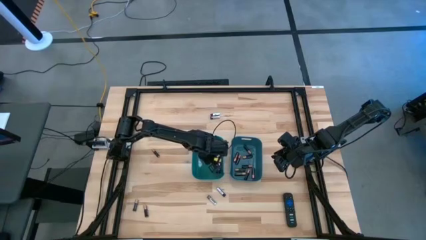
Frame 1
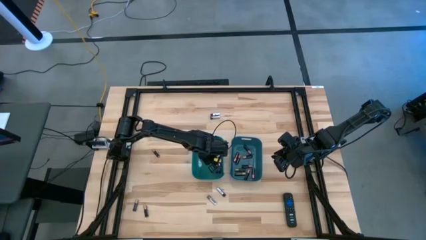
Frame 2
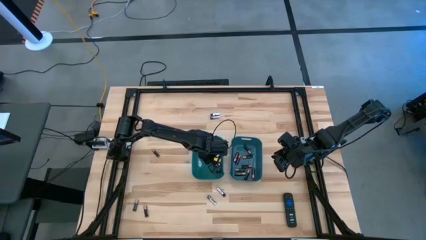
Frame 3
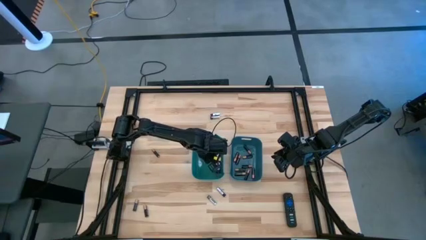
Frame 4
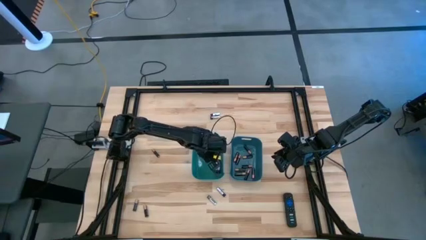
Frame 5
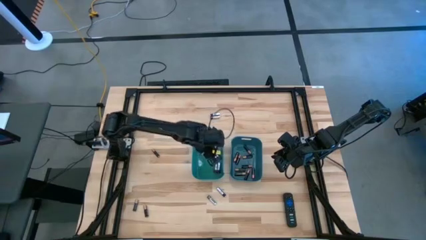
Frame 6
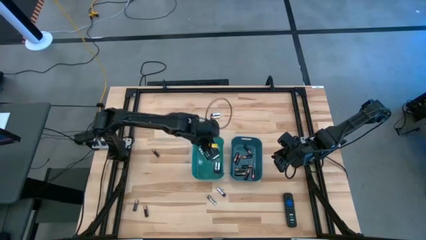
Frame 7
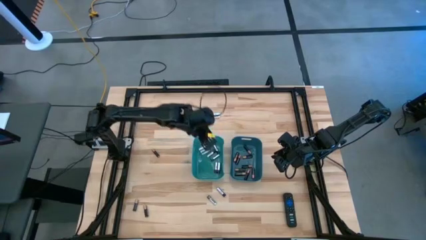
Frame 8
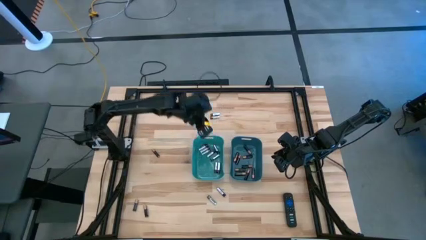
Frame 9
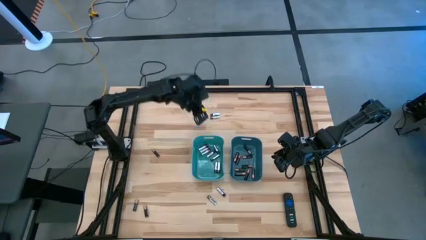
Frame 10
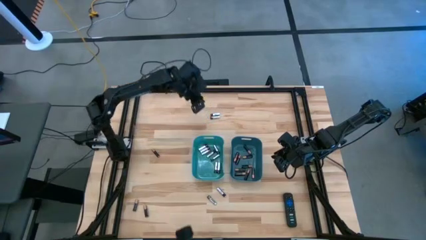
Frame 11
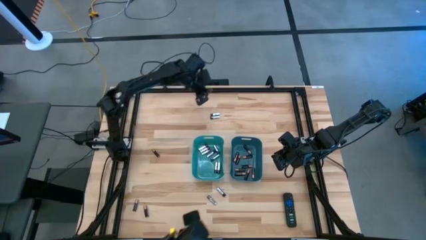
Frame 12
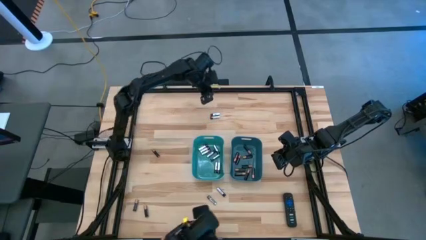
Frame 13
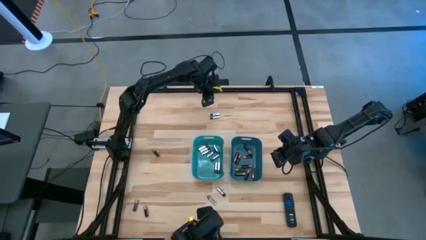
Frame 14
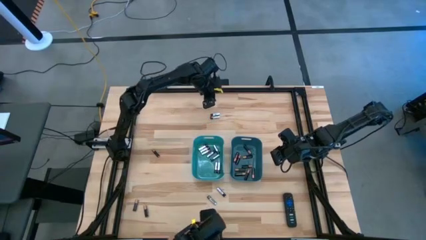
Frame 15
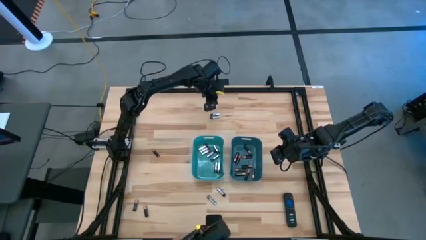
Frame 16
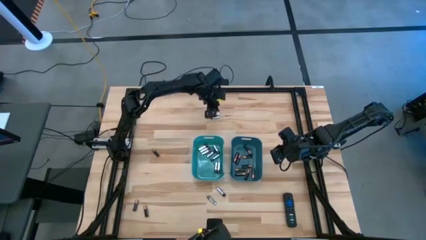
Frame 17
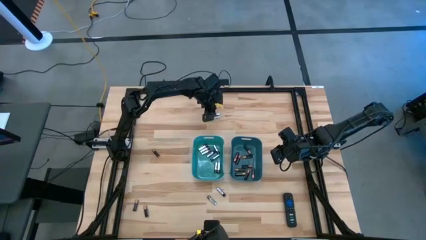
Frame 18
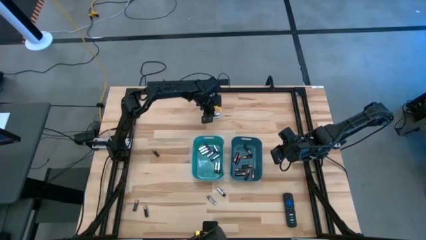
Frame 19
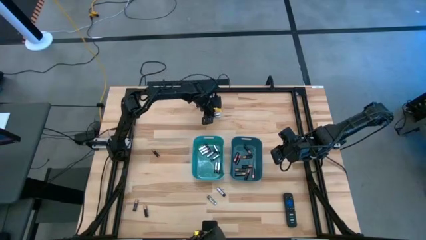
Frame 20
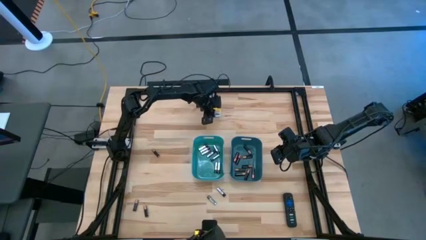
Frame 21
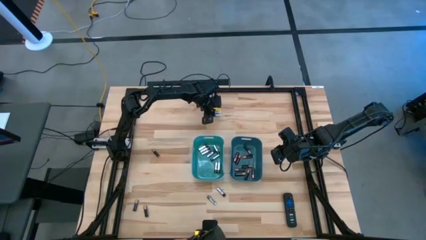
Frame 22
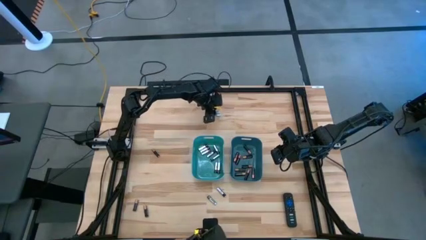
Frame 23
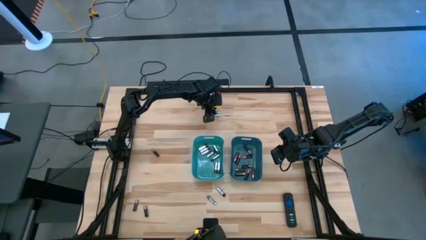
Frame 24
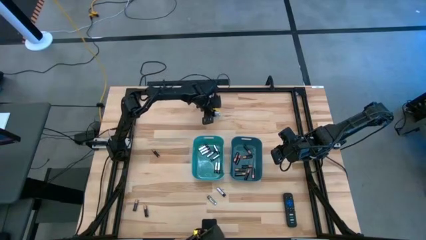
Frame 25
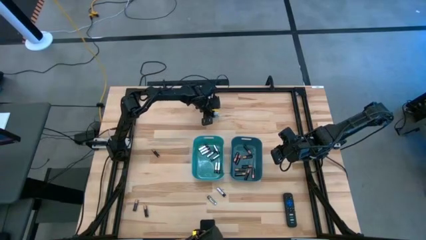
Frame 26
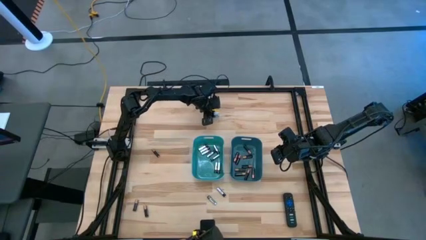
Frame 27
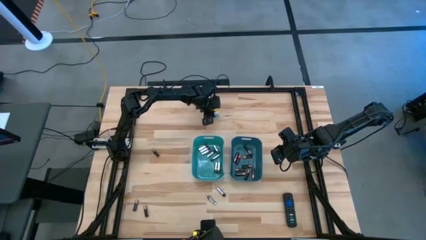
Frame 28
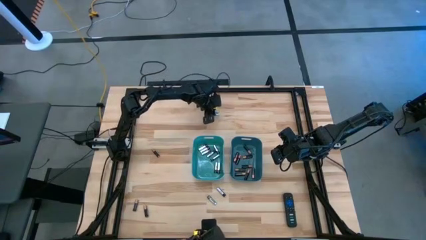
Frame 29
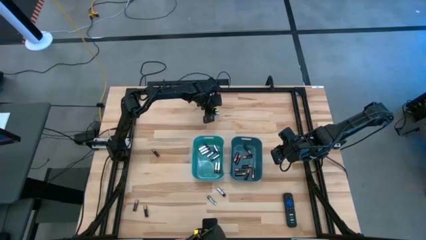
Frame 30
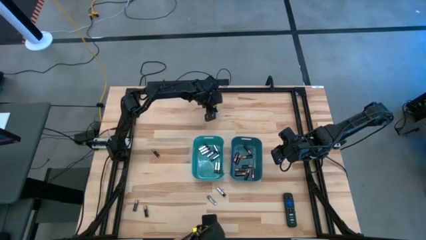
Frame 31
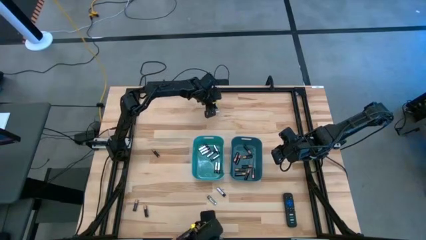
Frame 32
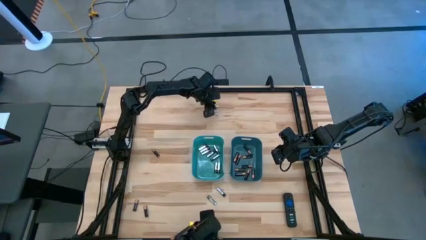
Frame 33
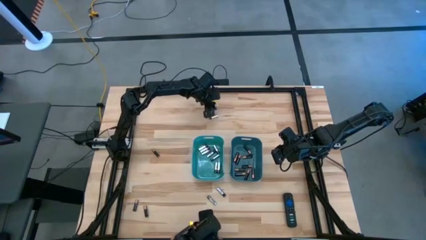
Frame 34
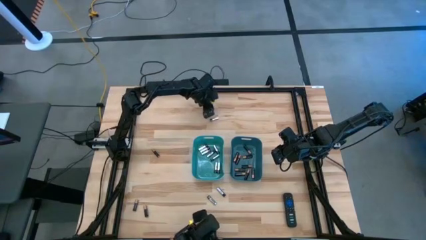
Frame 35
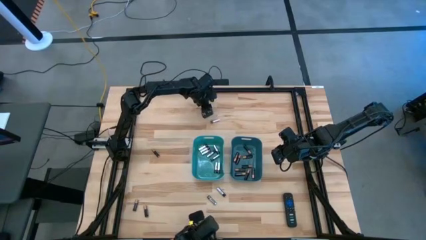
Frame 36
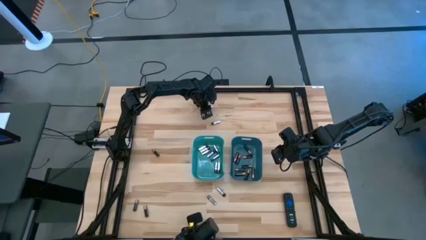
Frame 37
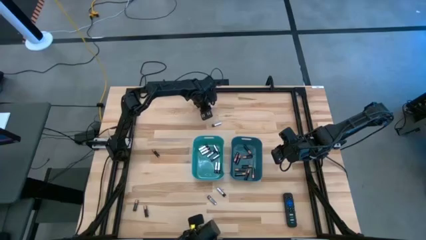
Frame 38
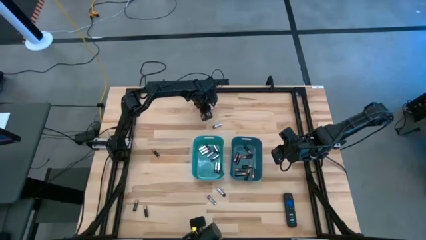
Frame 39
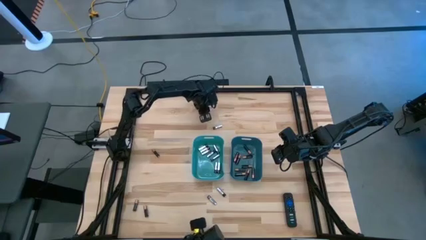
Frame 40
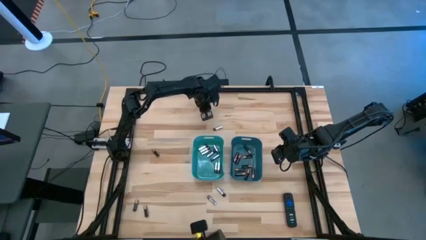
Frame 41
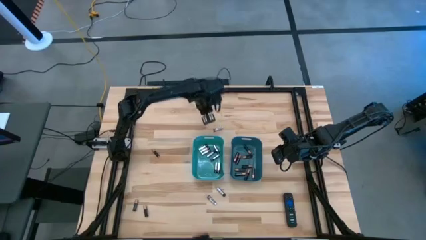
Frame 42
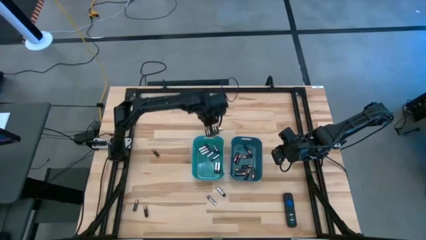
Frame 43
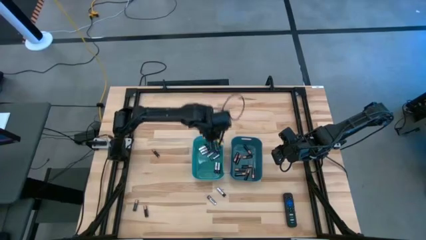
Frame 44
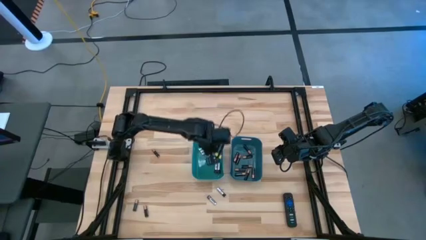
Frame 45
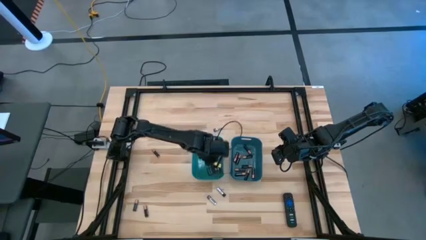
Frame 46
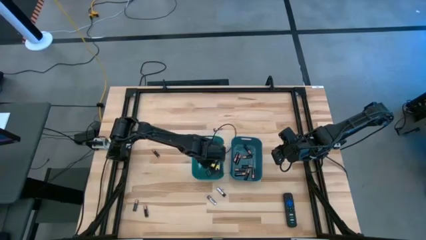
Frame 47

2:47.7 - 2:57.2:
Task: Sort batteries
Put the silver battery into the green bin
